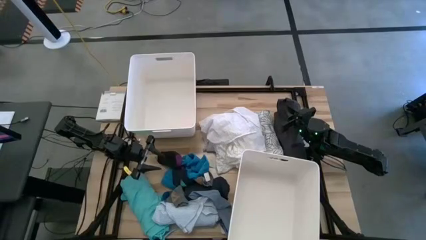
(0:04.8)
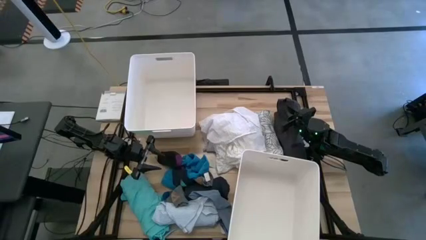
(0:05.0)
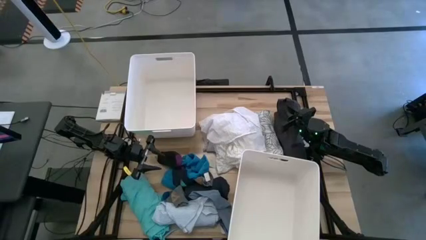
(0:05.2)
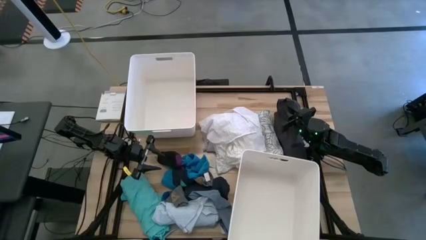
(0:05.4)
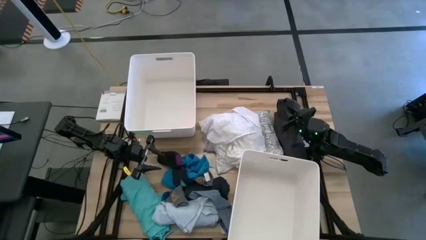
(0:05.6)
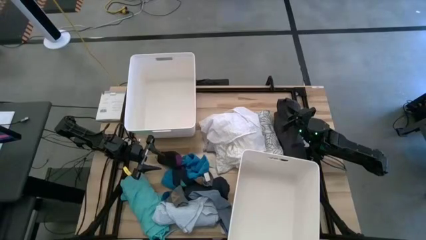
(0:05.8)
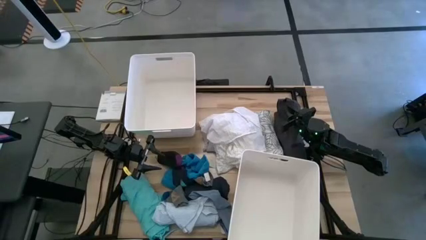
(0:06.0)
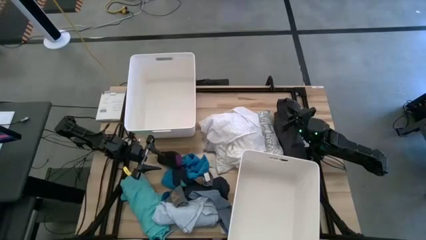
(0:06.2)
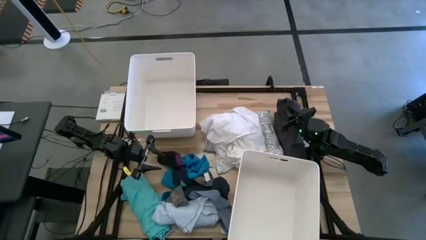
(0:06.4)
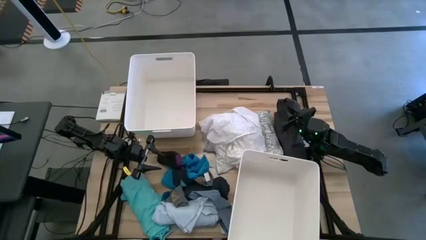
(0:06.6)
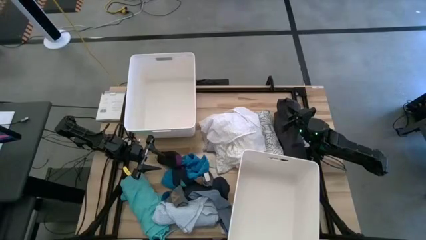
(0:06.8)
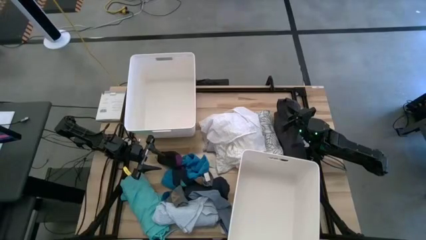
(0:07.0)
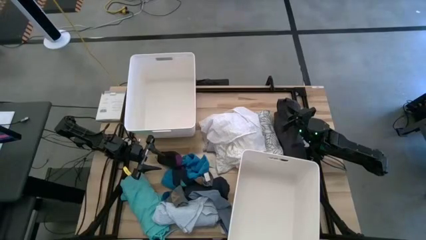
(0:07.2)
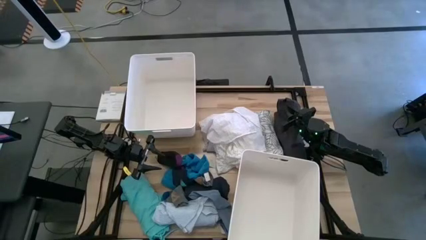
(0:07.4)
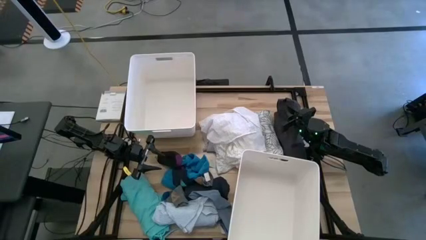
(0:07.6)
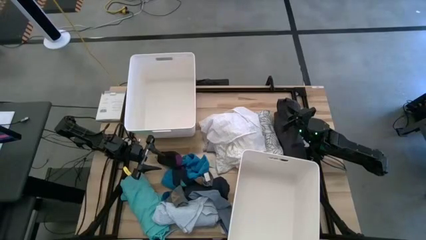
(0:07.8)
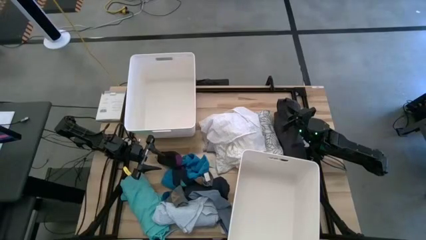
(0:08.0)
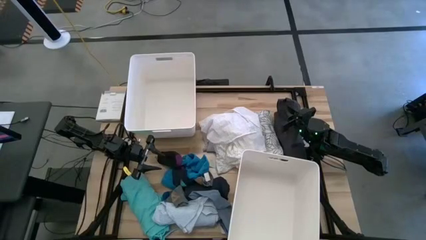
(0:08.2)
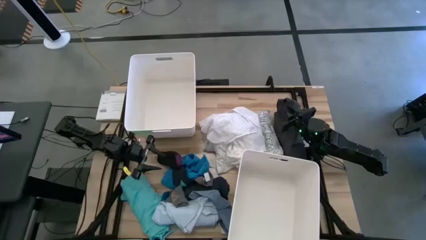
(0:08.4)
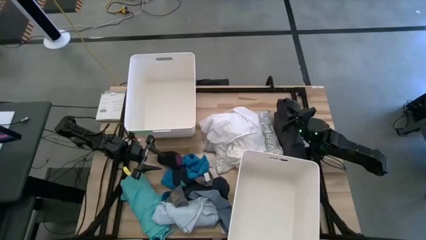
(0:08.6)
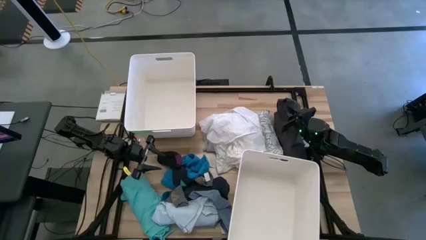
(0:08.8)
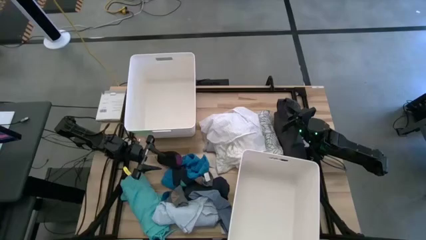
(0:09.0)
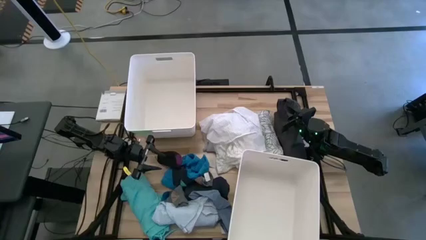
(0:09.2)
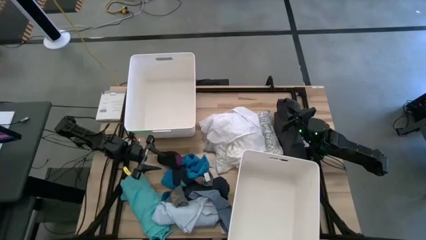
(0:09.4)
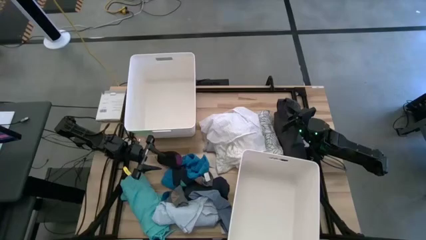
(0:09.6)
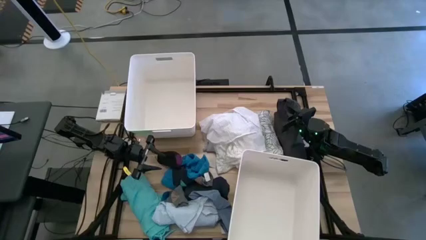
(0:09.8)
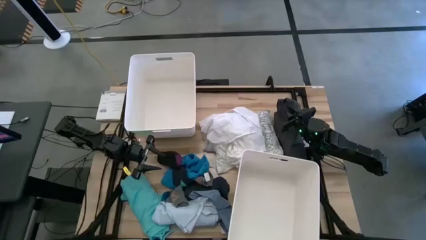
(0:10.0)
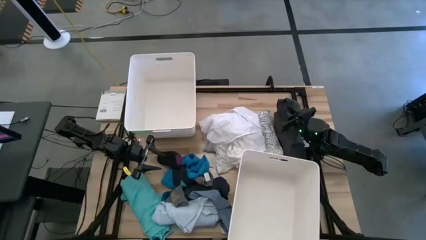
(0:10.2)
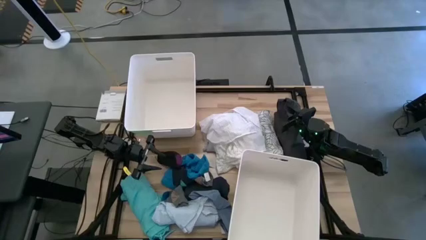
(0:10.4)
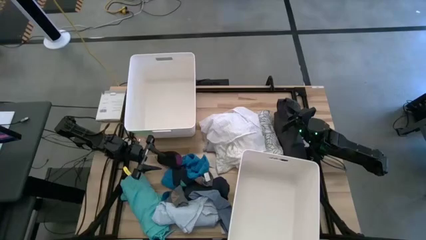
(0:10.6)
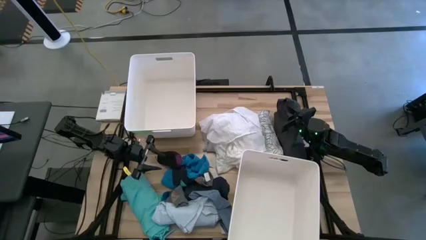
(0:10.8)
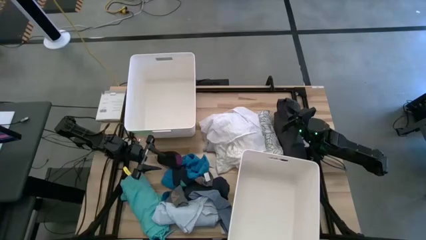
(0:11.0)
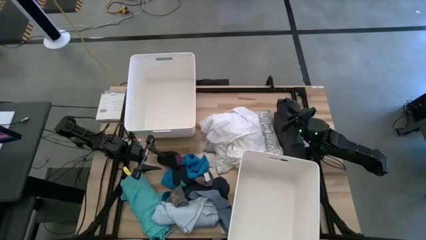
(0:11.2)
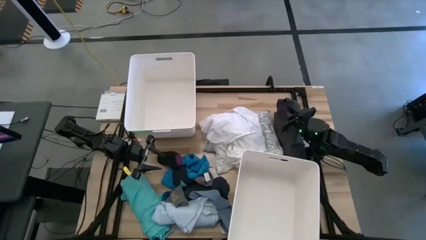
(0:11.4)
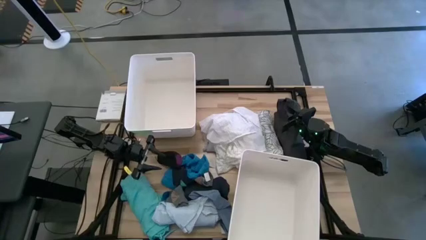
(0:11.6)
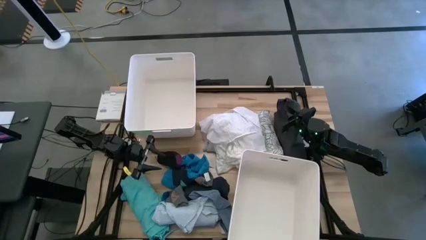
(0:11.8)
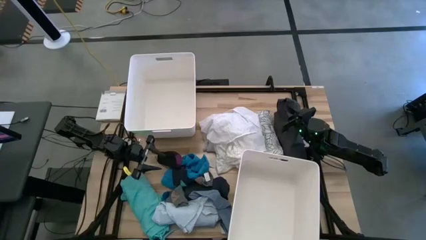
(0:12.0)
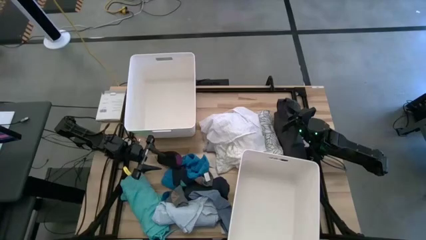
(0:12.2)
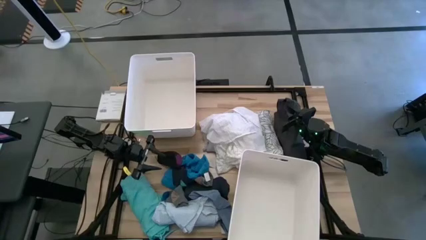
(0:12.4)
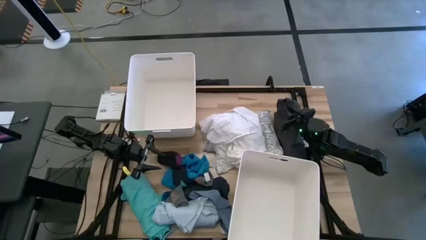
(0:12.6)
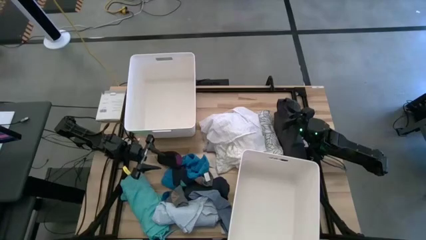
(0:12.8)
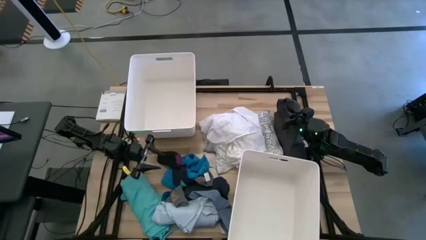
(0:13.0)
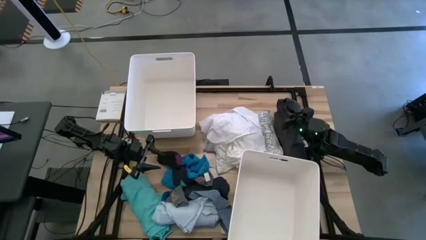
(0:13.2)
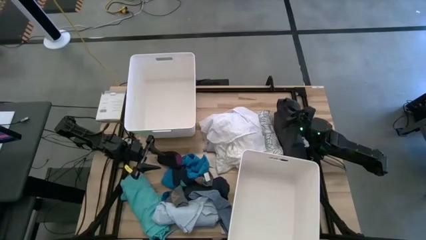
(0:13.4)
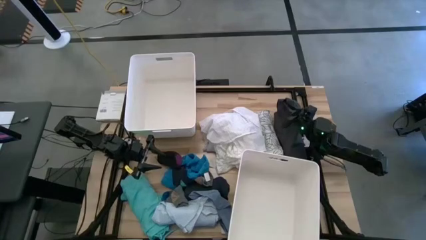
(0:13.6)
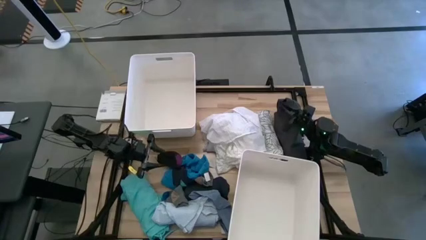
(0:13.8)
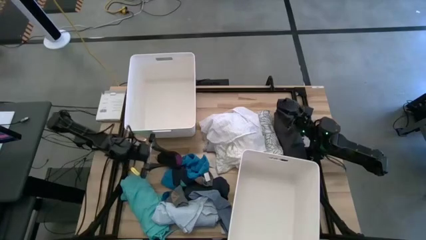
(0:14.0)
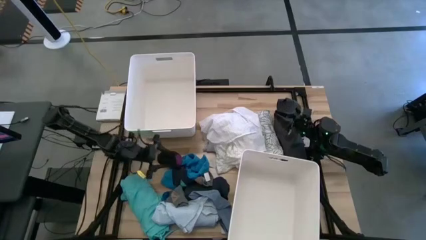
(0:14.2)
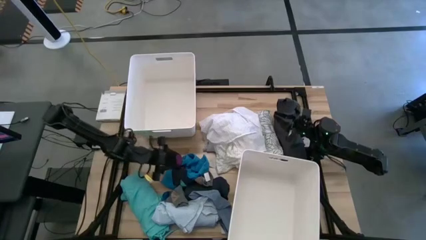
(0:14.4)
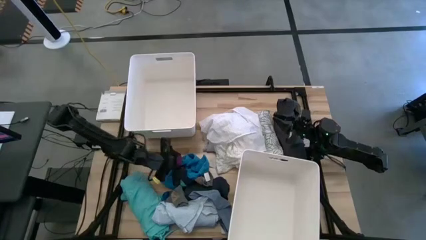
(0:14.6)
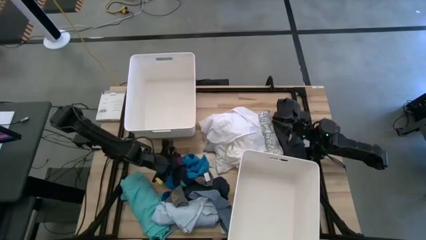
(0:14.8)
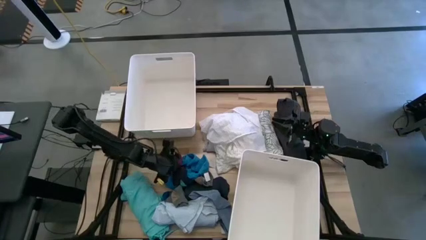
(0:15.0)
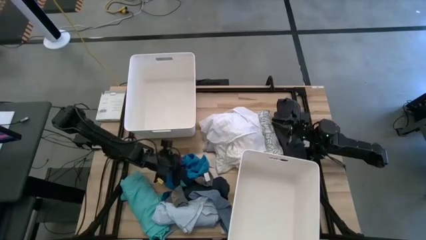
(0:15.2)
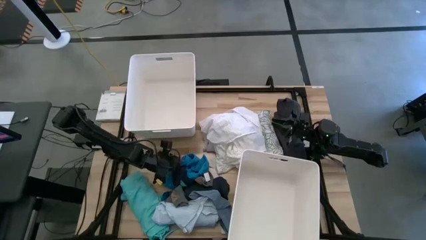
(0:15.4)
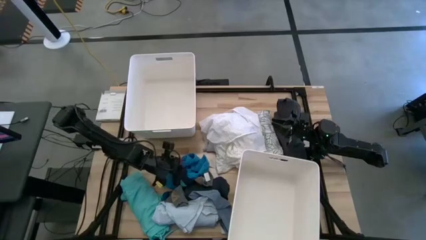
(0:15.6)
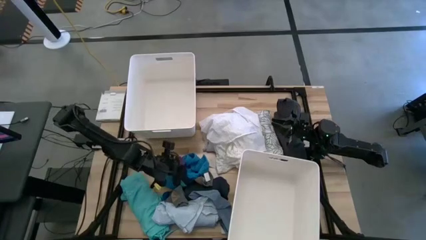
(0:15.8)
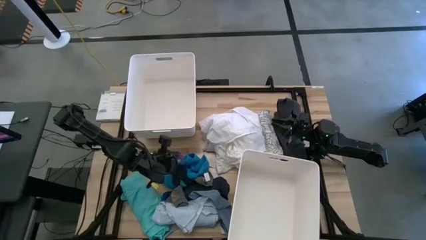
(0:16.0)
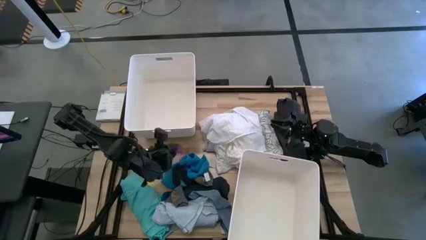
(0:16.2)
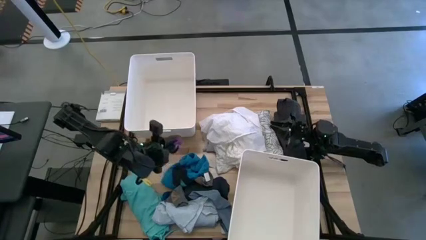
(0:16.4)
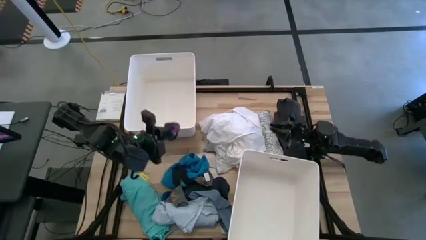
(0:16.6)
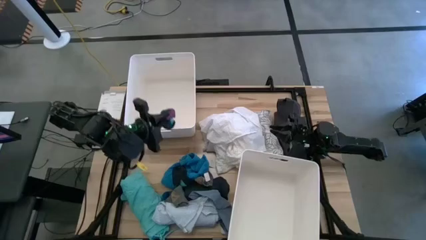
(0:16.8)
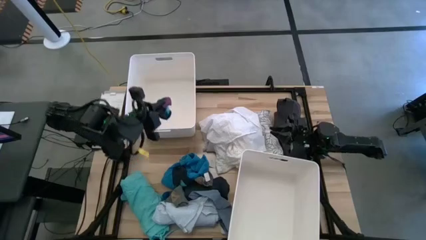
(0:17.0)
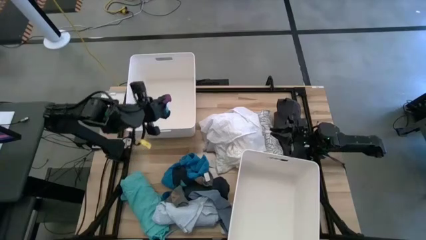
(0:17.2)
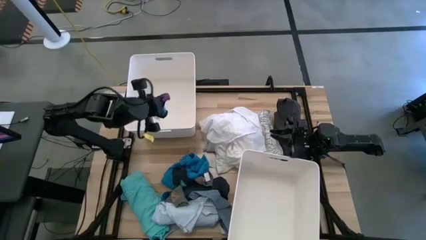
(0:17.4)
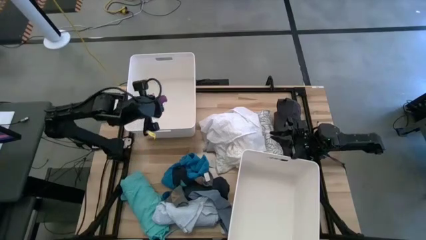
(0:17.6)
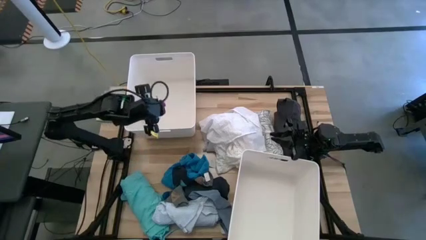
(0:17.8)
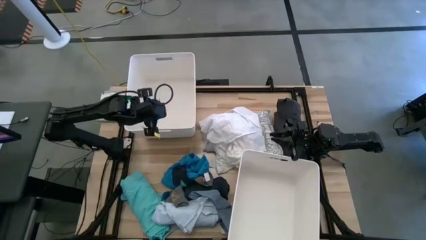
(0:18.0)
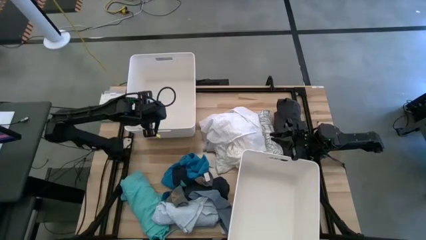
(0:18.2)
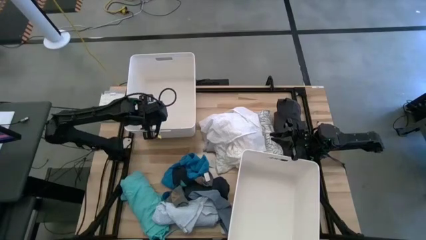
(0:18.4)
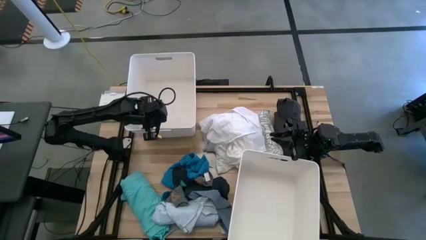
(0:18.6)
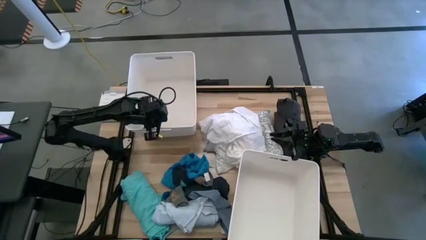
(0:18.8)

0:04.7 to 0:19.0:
Task: Sort clothes
Put the black sock into the top white laundry bin

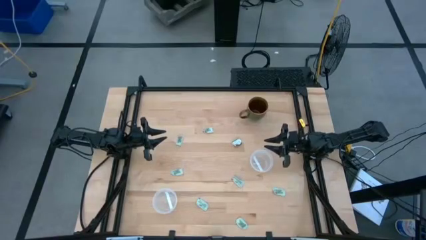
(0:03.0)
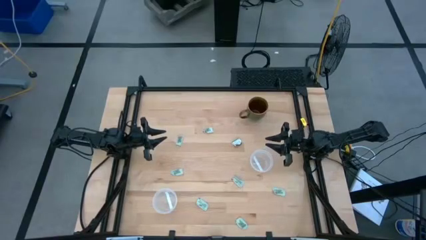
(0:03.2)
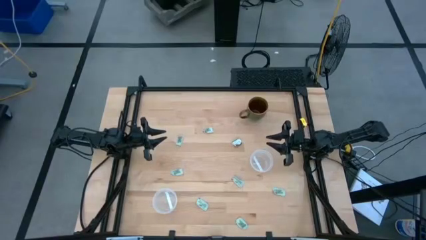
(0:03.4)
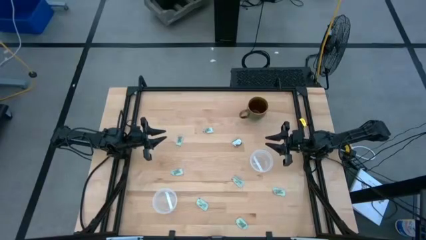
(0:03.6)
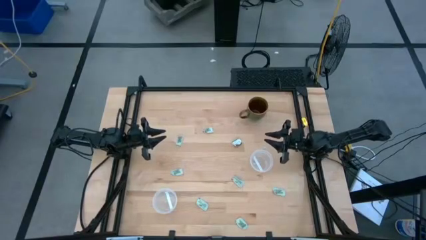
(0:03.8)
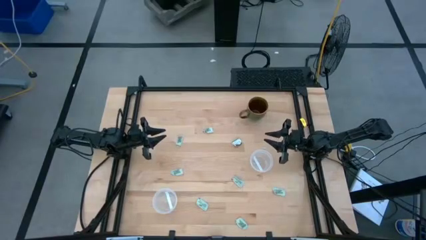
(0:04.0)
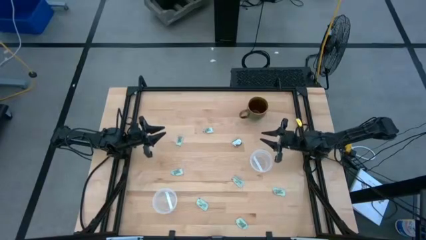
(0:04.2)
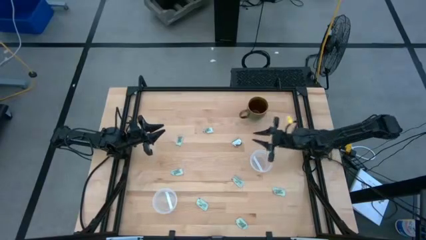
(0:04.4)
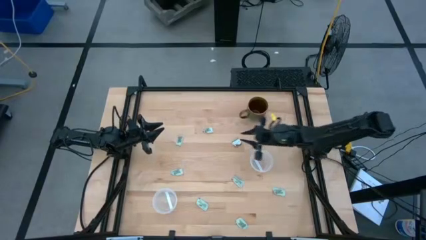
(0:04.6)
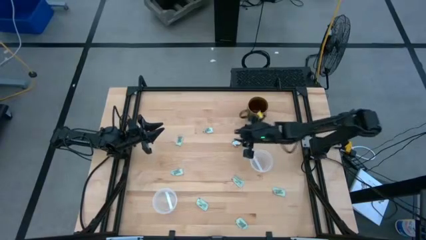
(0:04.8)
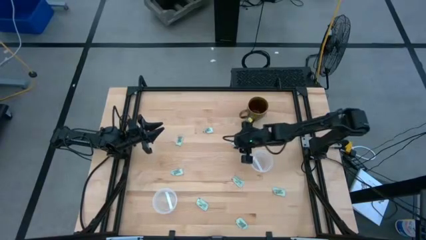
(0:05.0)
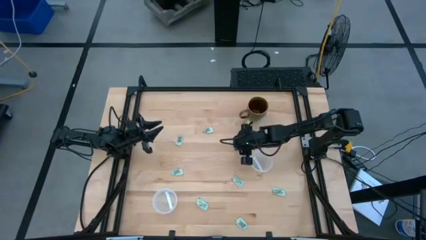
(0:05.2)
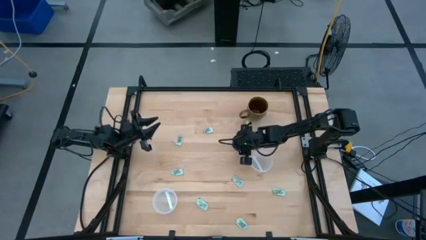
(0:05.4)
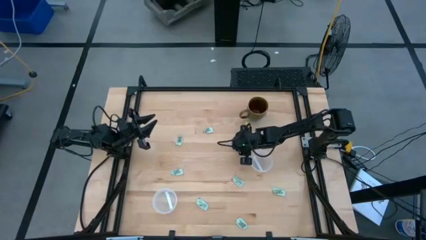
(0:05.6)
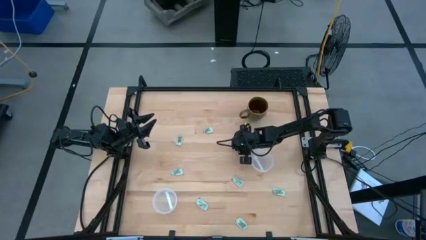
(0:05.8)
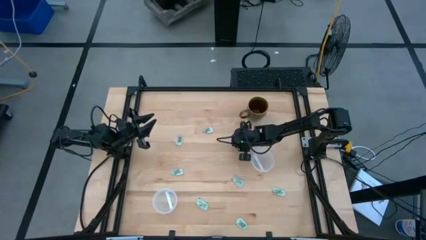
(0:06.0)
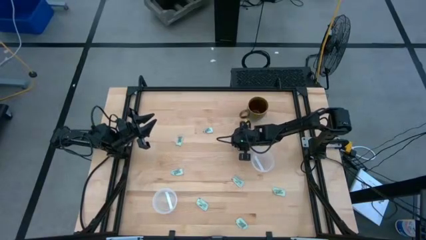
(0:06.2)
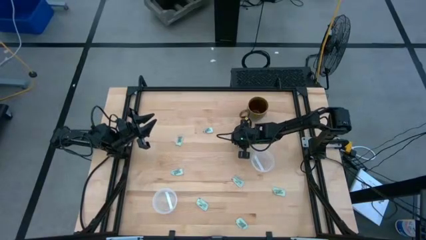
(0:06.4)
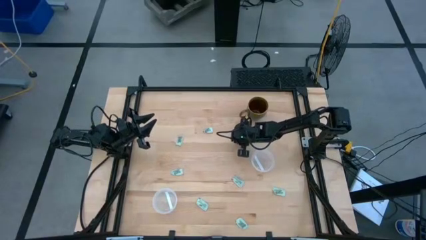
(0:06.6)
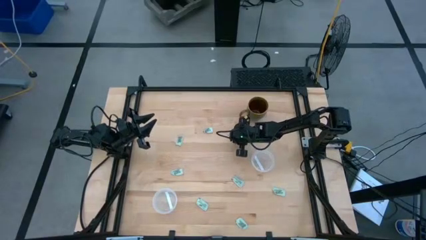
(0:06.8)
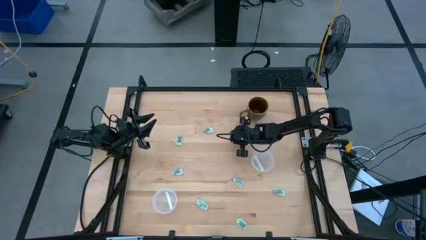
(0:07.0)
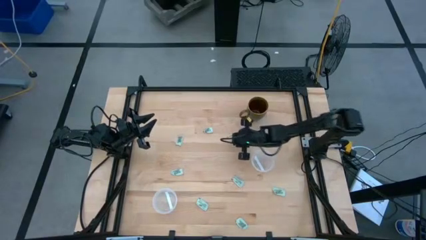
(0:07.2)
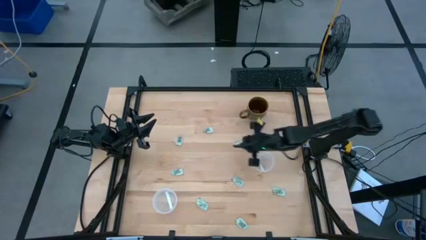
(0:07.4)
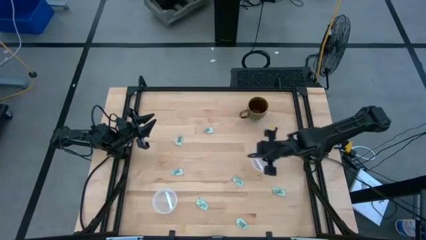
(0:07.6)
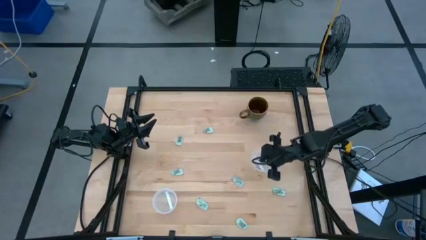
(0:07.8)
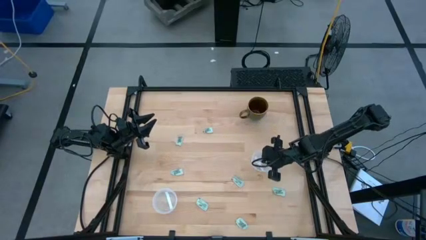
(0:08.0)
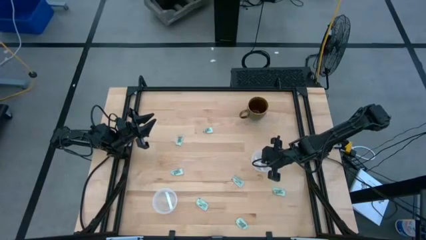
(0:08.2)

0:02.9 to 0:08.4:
Task: Pick and place Stevia / Truvia into bins
Put the truvia packet into the top transparent container
